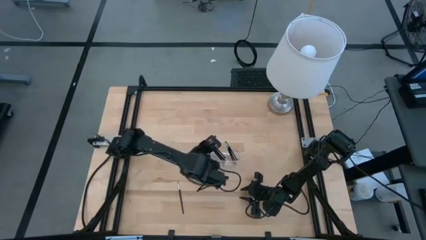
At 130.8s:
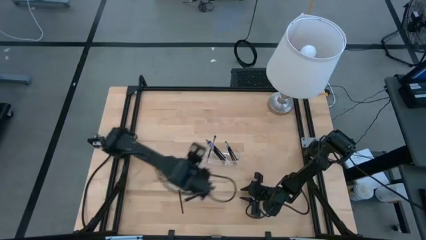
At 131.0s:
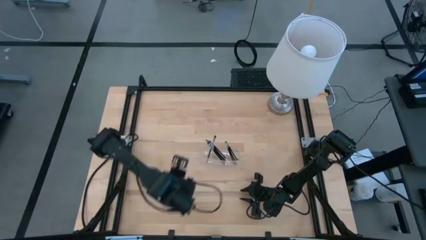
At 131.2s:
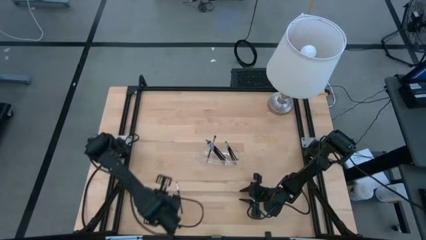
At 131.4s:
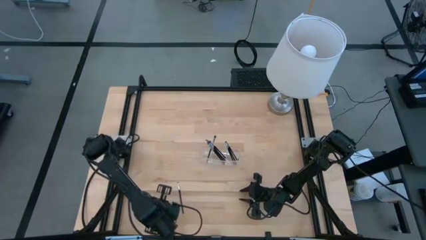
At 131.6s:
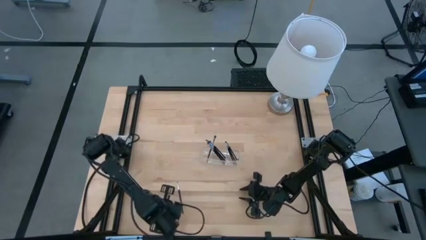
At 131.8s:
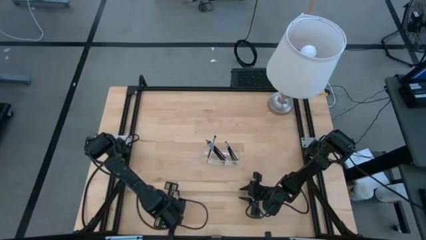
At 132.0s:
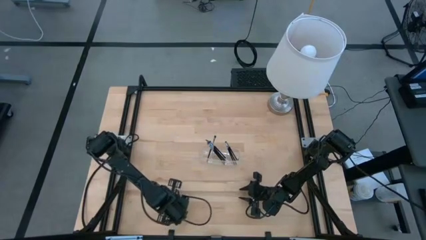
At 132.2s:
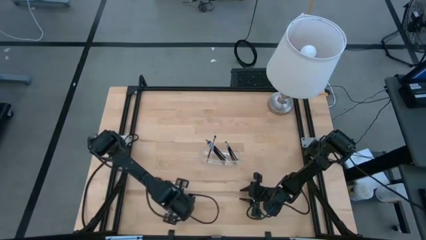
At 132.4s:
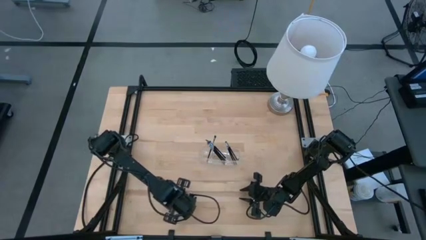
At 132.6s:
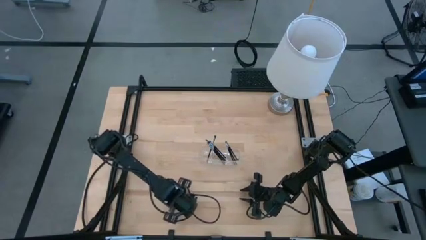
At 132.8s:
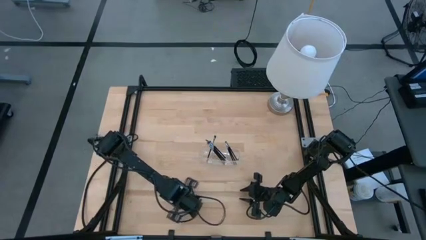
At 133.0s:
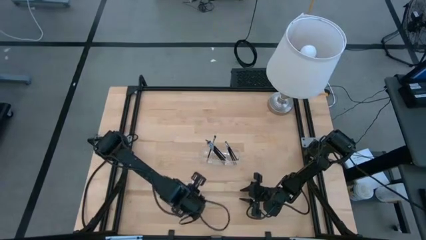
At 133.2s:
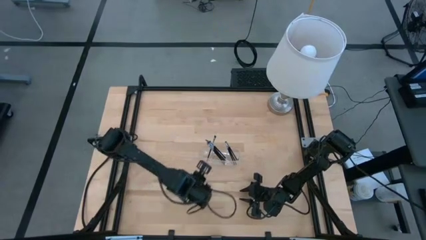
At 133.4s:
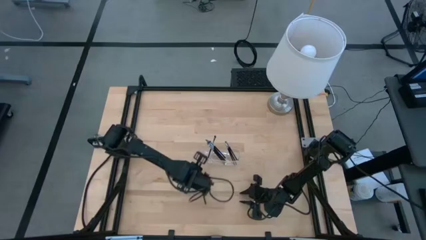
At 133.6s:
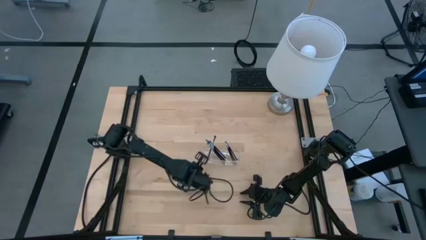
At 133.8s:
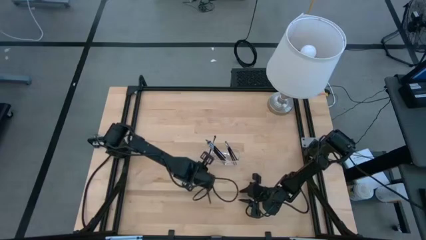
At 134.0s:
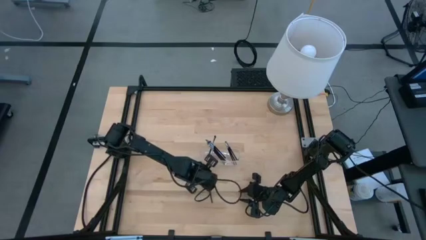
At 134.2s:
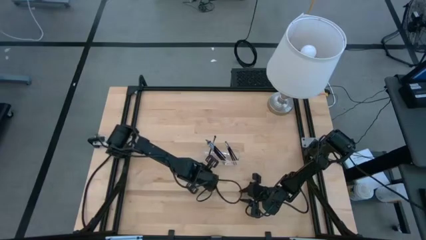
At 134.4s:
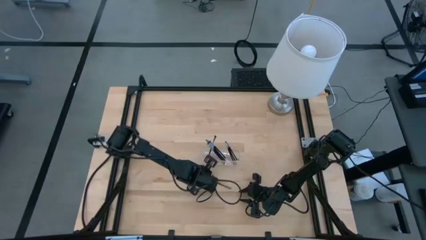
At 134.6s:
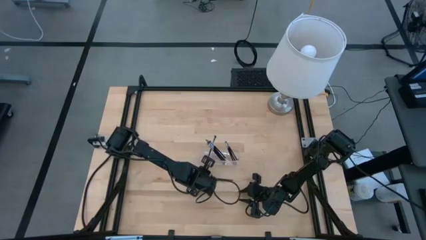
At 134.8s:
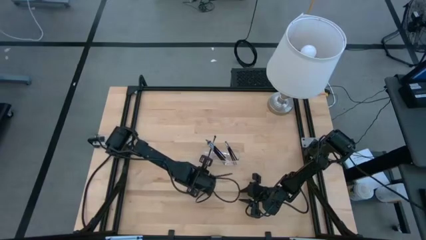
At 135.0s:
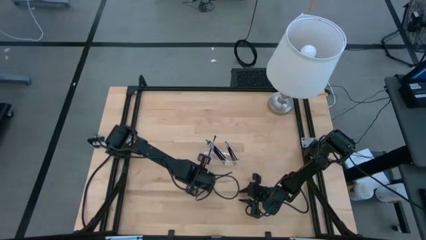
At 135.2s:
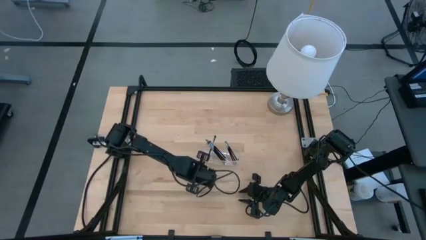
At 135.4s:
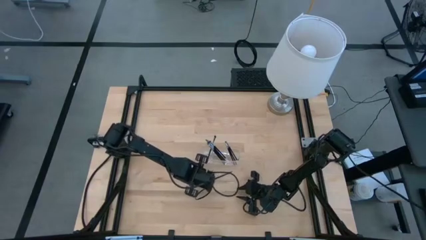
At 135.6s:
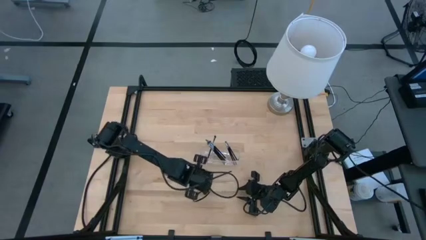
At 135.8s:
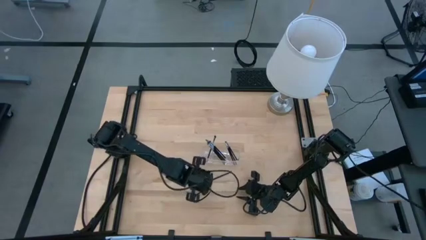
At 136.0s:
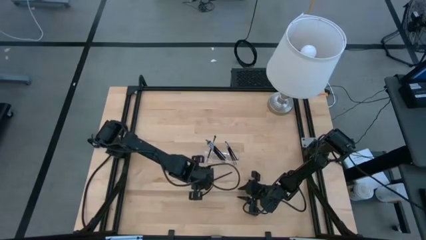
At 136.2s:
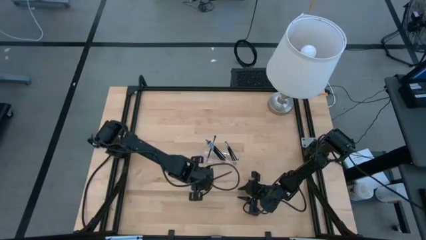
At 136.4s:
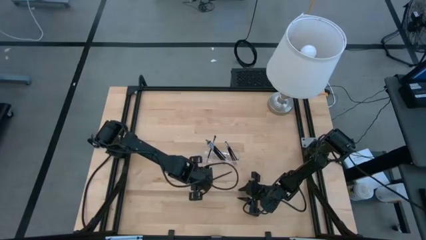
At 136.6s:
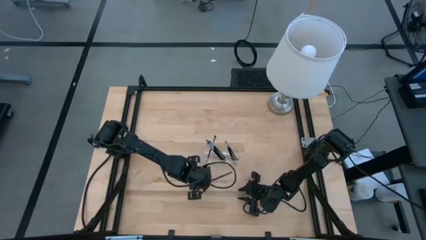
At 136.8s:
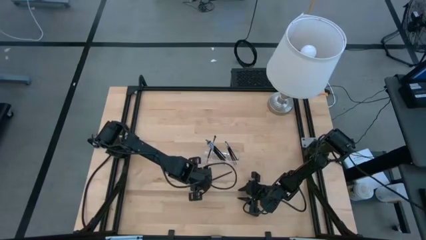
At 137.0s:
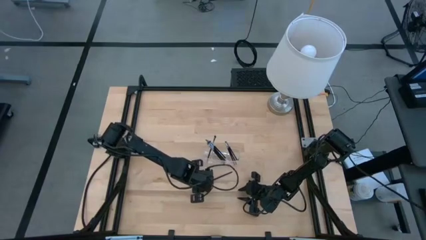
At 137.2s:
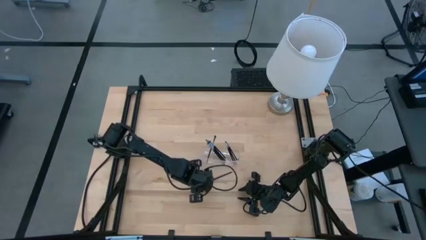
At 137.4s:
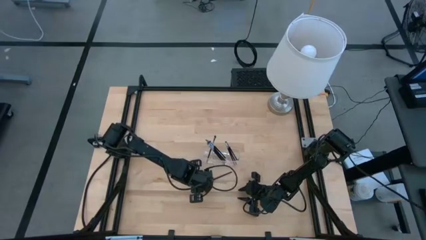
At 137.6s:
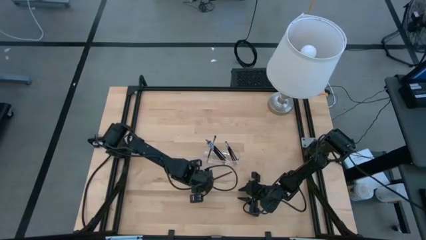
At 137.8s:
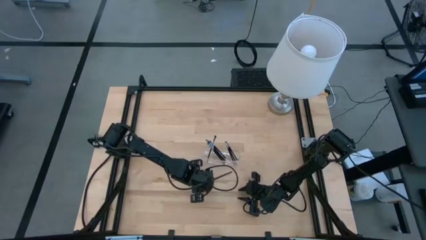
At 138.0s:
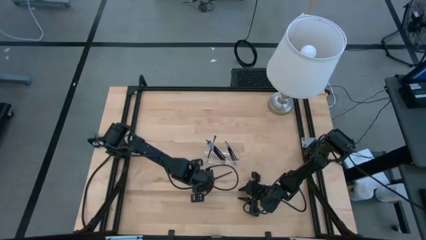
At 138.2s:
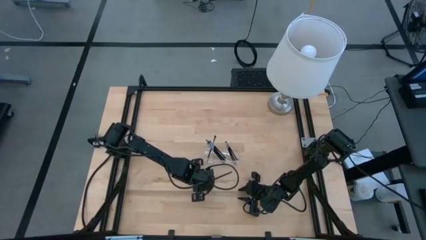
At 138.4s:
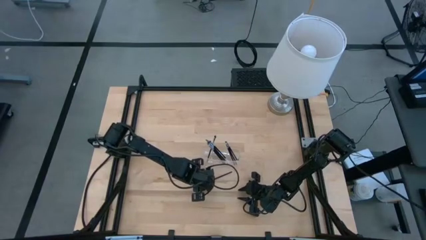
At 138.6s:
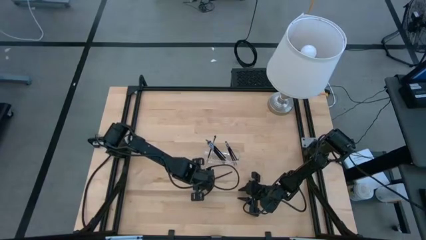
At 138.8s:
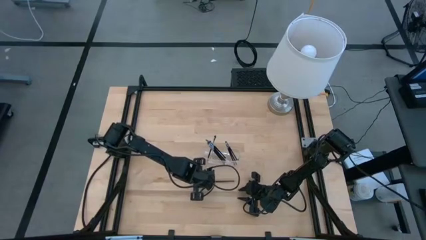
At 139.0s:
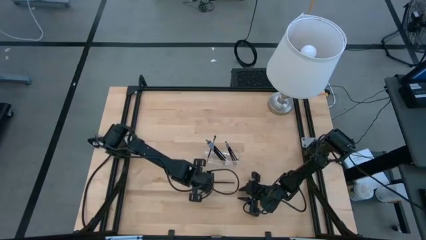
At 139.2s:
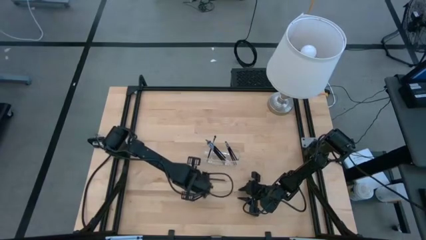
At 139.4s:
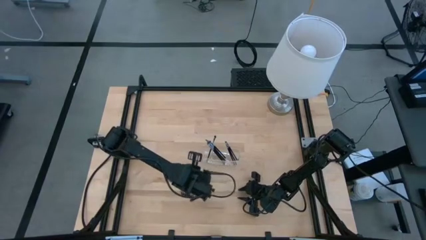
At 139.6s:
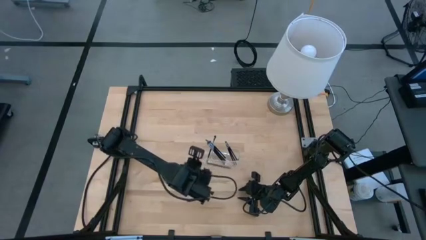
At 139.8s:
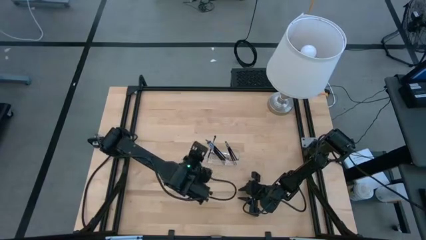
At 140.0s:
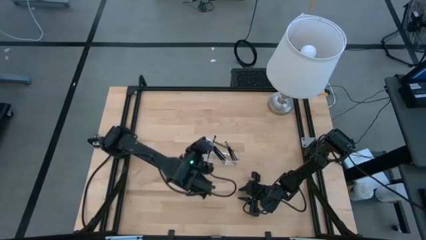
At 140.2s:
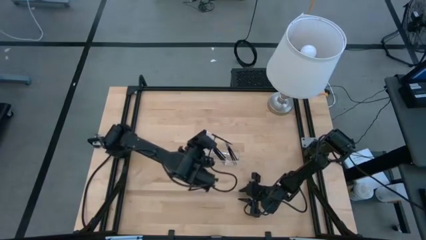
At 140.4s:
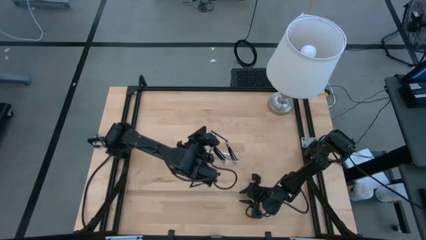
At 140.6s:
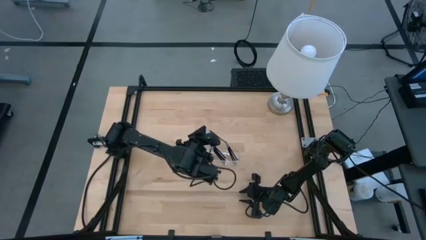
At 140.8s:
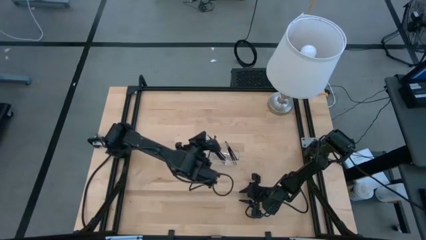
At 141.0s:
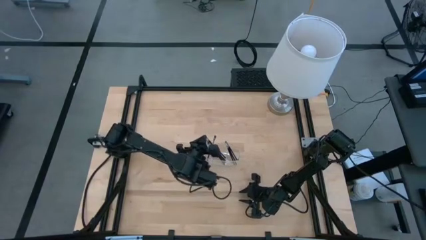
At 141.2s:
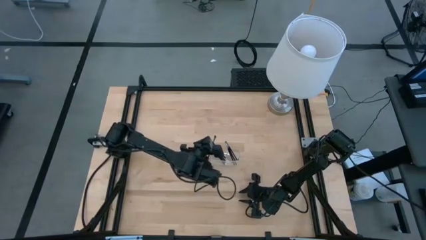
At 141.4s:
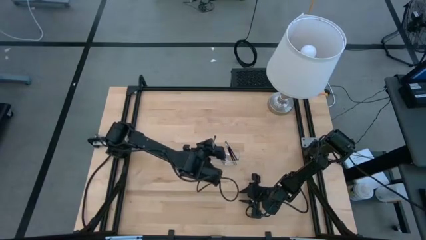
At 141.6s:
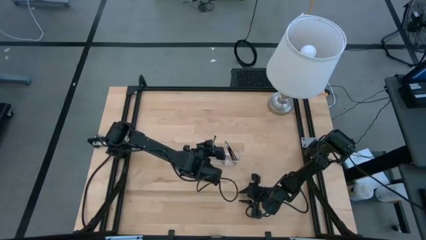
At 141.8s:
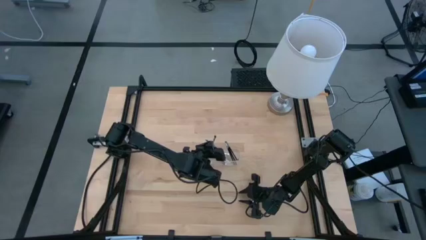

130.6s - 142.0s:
Task: Put items in baskets/containers
Put the eyeshadow brush in the transparent organizer

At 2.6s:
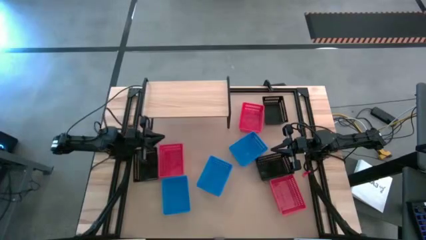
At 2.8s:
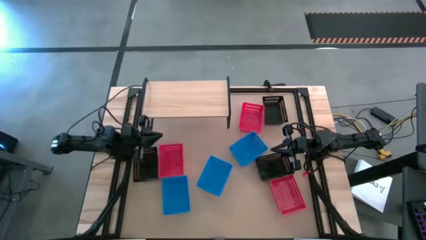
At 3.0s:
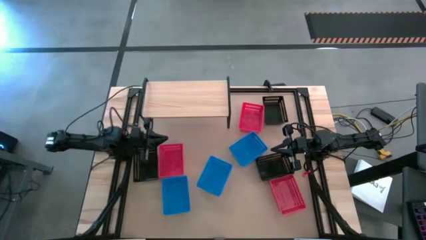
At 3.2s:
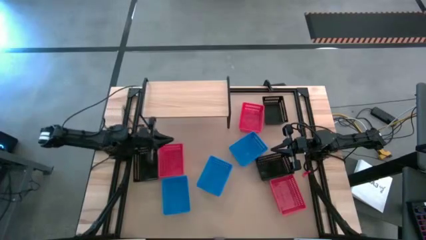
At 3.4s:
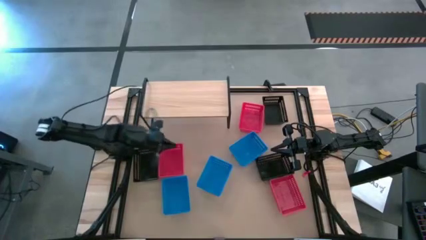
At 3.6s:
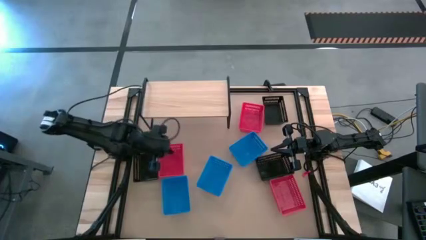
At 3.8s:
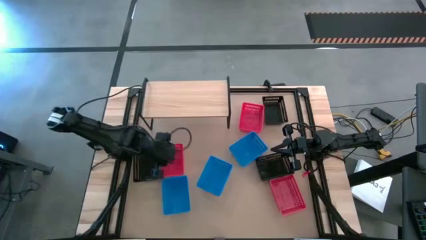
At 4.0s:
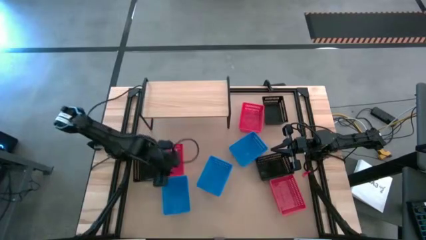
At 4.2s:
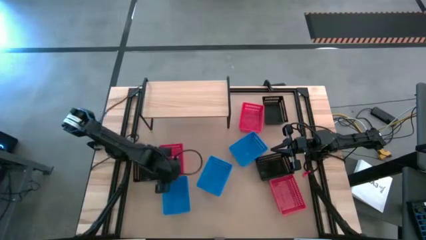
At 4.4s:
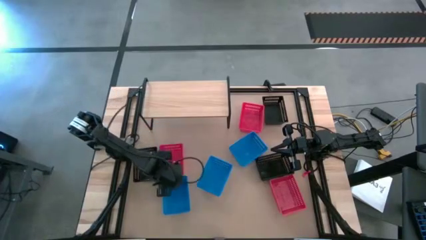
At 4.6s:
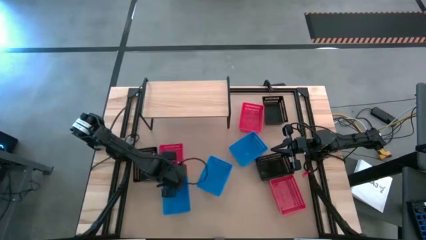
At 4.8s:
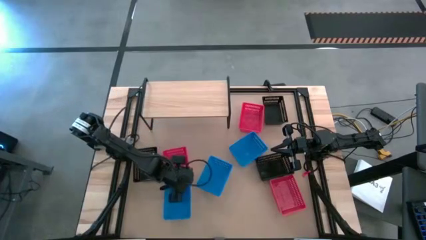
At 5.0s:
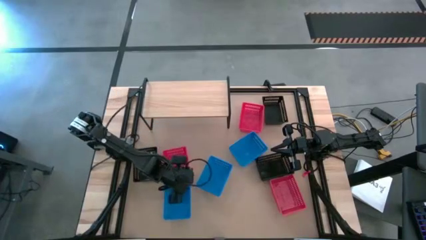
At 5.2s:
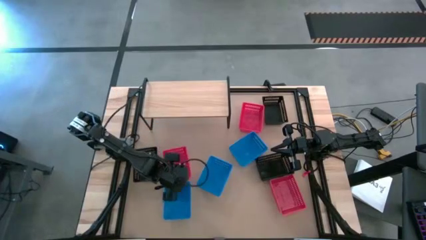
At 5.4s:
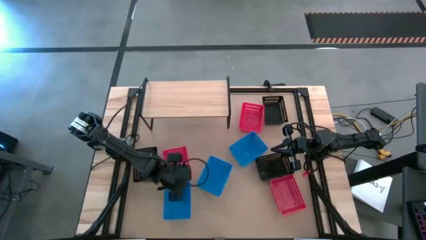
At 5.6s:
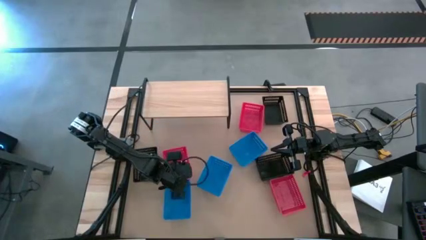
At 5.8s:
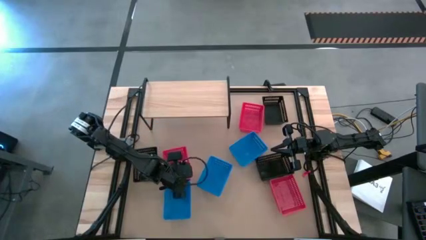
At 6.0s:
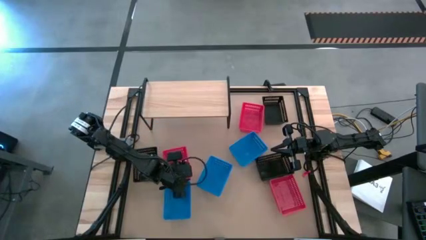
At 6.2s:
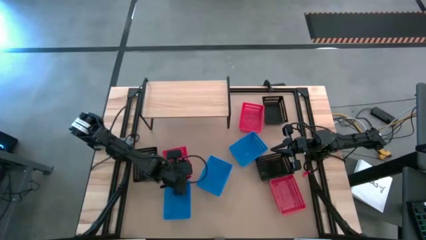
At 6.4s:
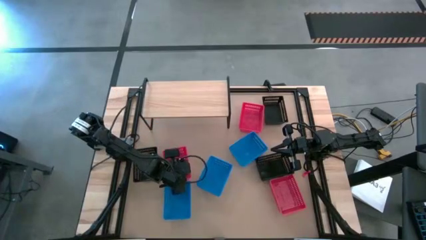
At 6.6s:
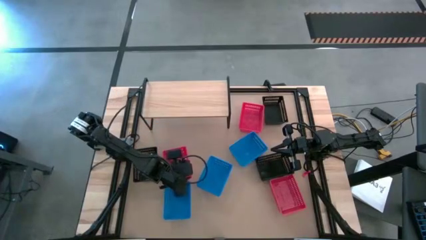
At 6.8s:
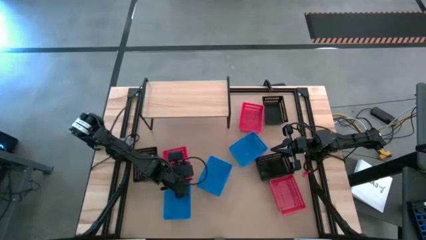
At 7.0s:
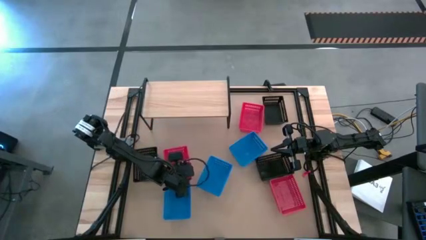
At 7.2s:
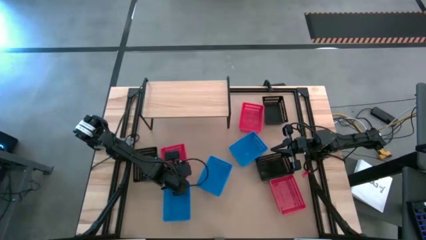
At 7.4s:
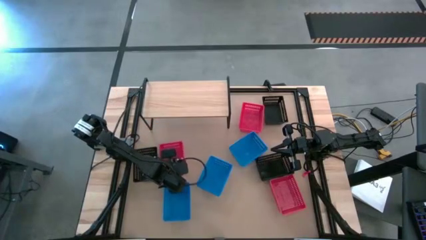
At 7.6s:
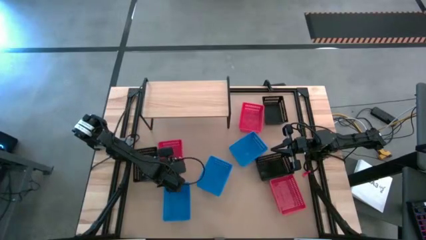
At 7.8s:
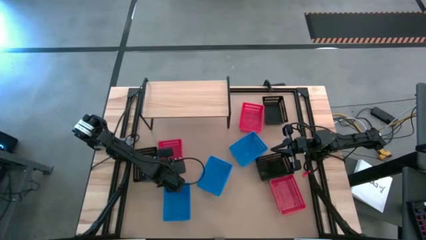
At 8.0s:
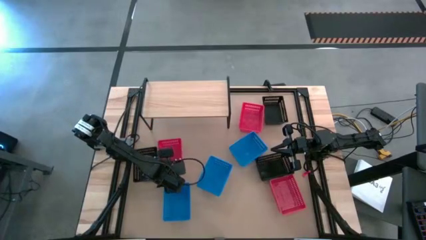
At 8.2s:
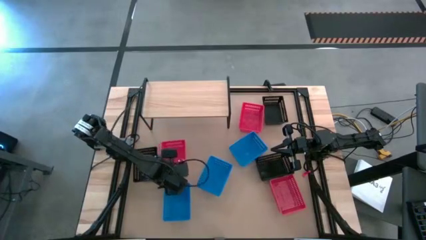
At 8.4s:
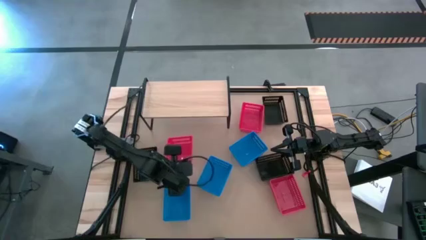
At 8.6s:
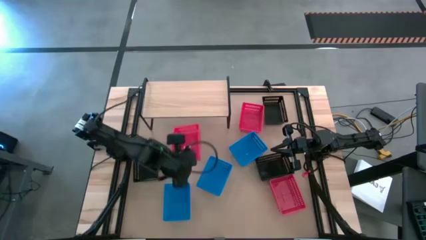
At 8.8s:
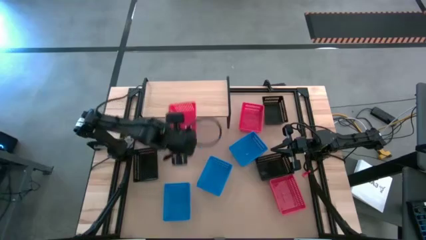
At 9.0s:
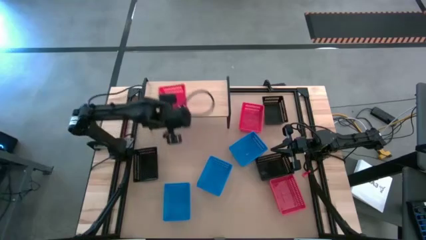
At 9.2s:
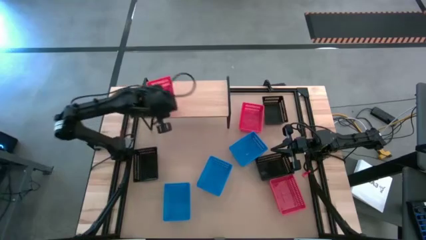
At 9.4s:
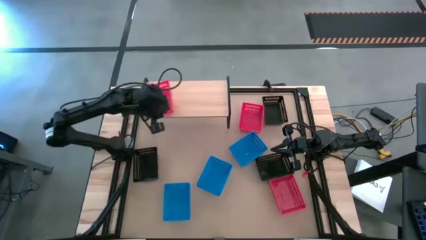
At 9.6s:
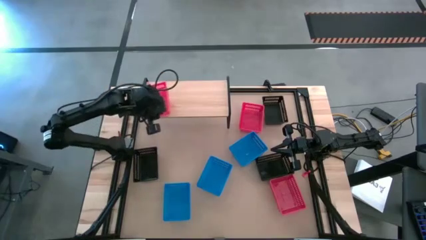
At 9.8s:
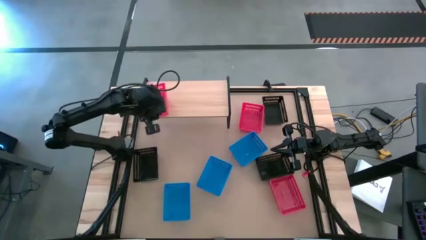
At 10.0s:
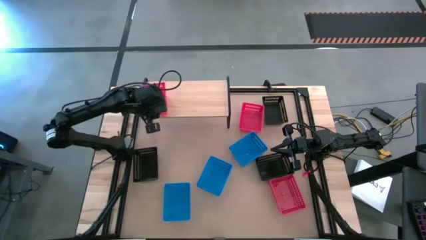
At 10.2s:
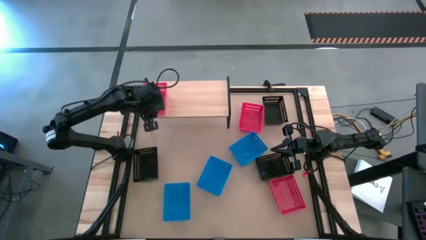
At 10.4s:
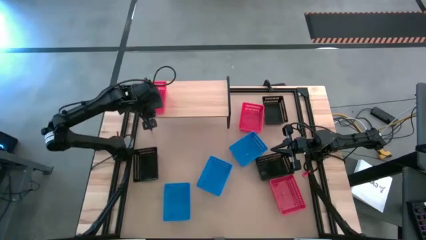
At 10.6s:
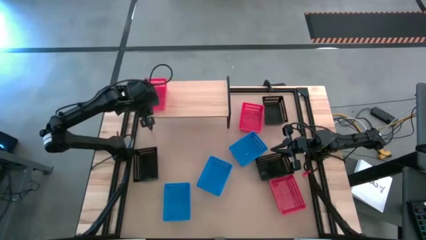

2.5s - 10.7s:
Task: Stack baskets on shelf by color
Put the left red bin on the shelf
